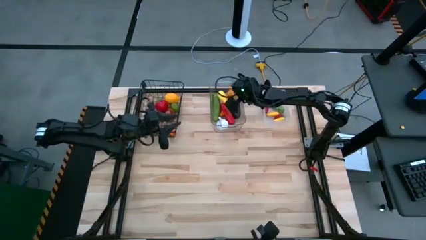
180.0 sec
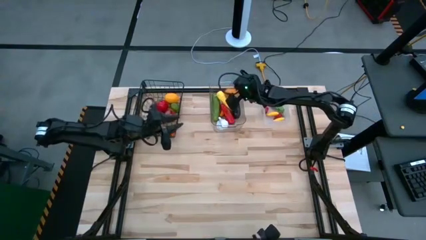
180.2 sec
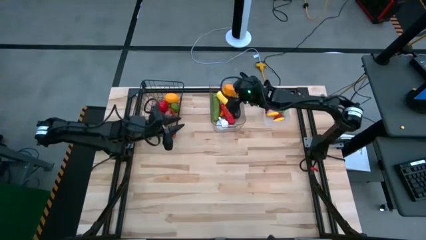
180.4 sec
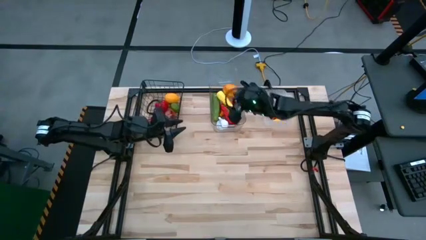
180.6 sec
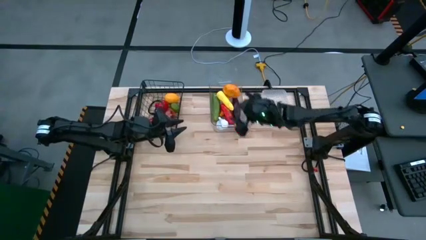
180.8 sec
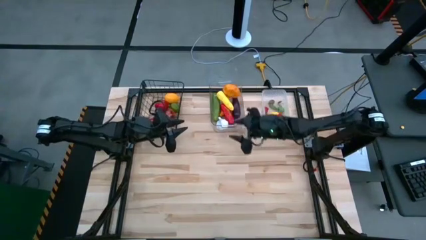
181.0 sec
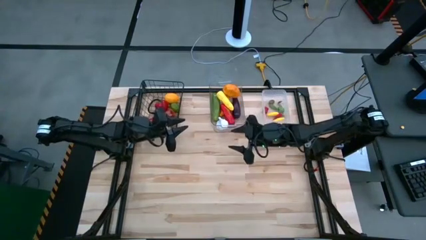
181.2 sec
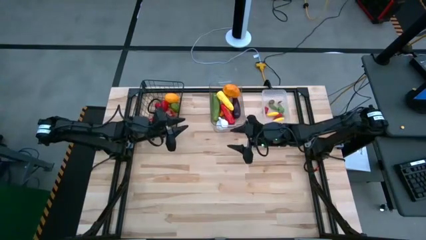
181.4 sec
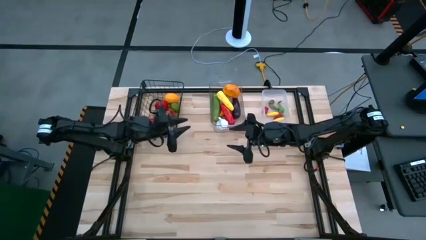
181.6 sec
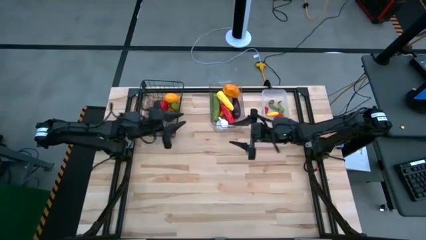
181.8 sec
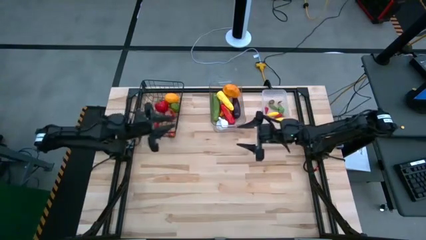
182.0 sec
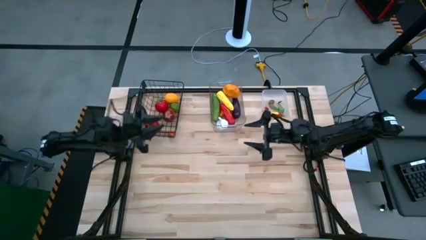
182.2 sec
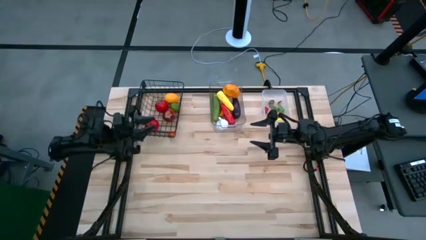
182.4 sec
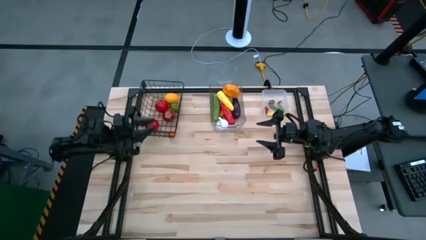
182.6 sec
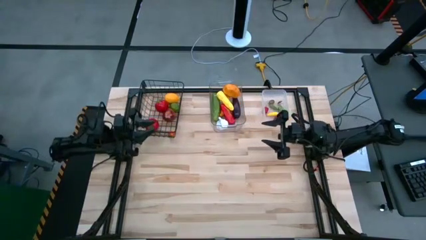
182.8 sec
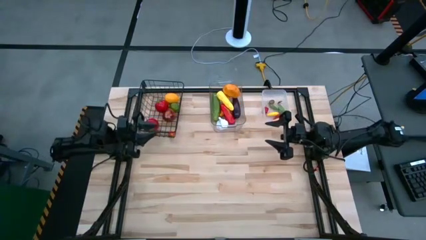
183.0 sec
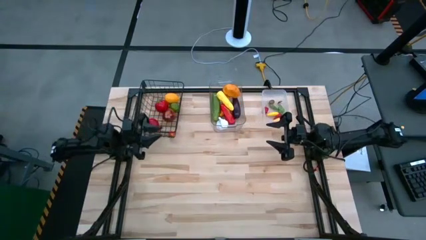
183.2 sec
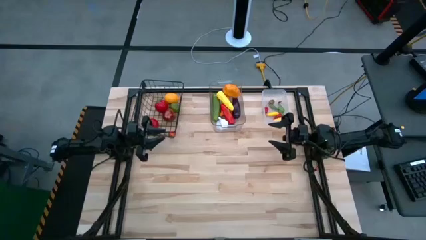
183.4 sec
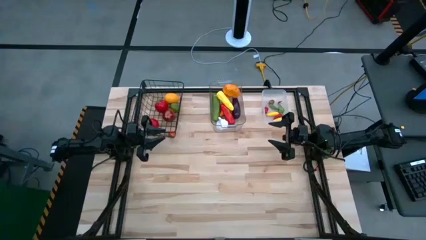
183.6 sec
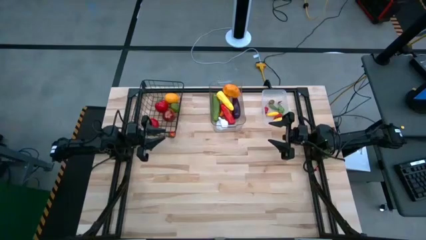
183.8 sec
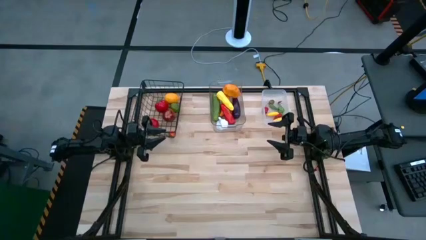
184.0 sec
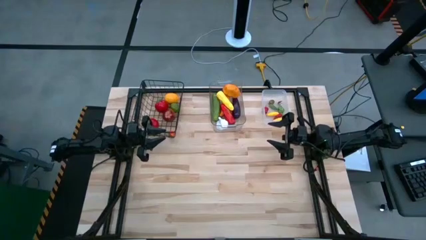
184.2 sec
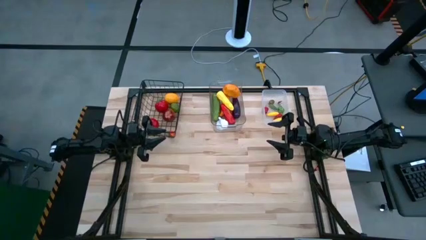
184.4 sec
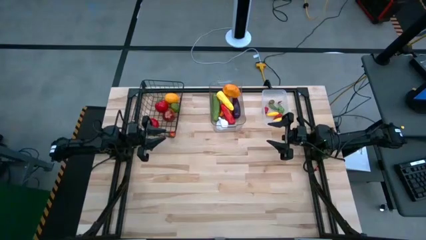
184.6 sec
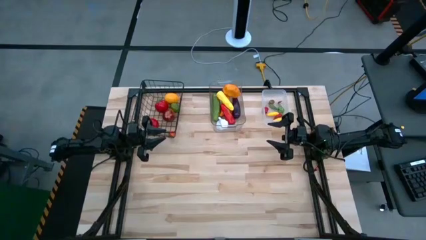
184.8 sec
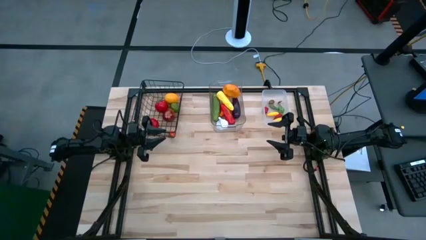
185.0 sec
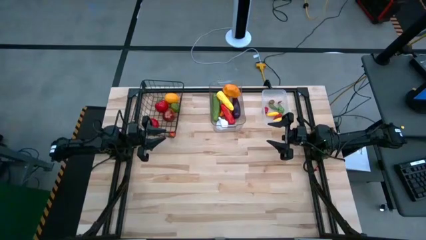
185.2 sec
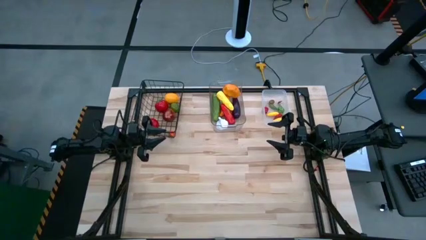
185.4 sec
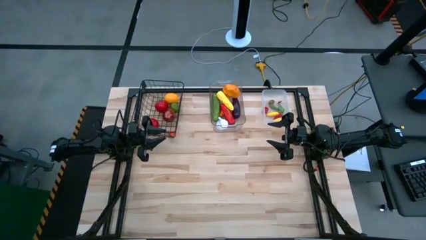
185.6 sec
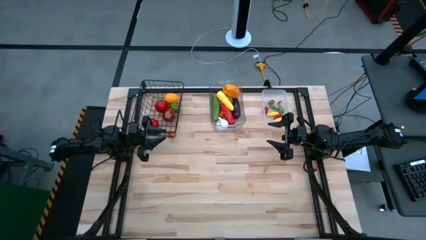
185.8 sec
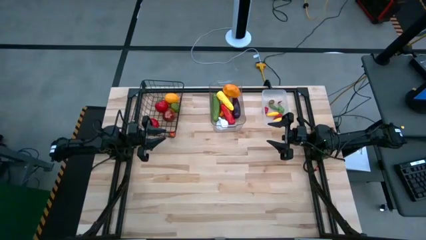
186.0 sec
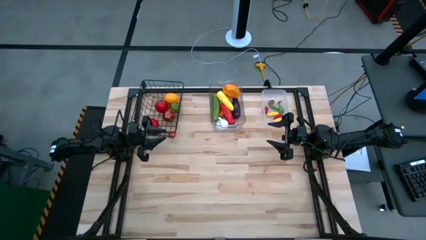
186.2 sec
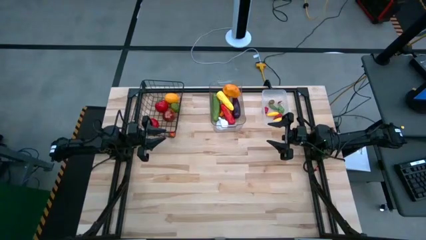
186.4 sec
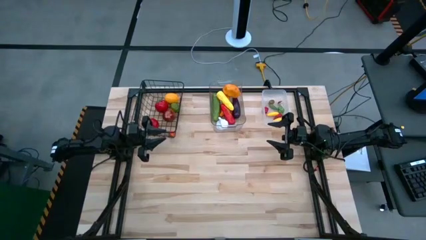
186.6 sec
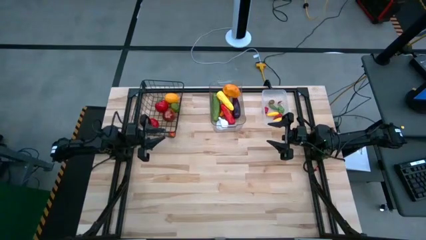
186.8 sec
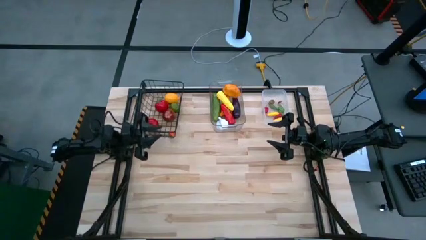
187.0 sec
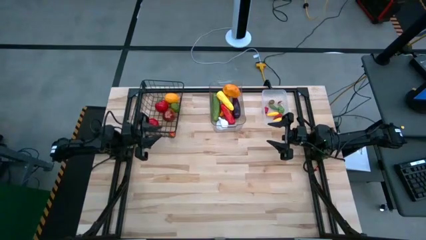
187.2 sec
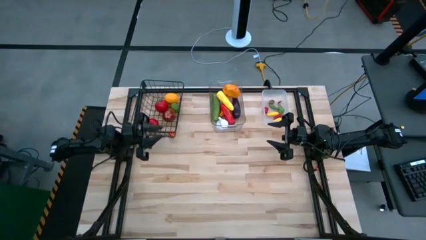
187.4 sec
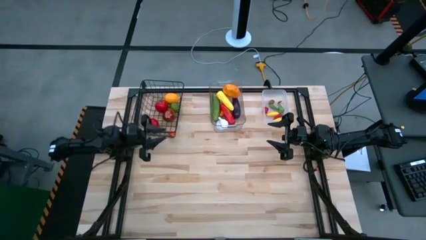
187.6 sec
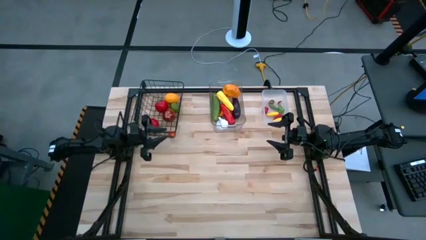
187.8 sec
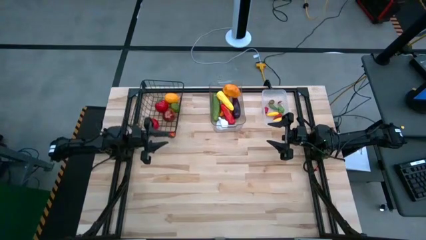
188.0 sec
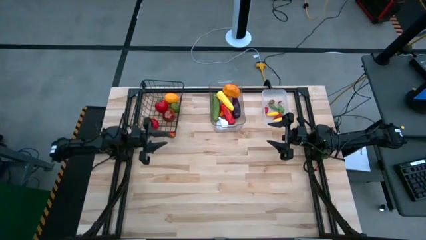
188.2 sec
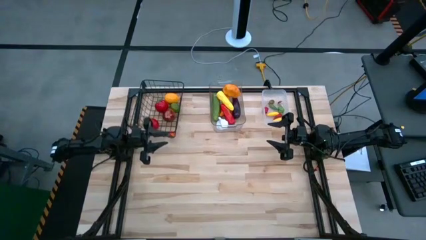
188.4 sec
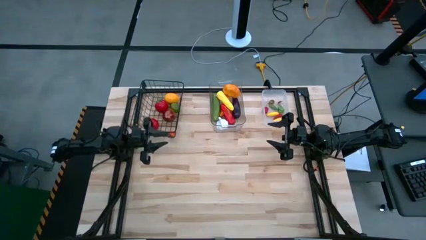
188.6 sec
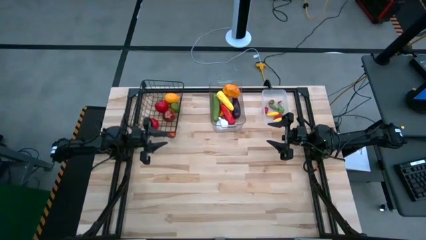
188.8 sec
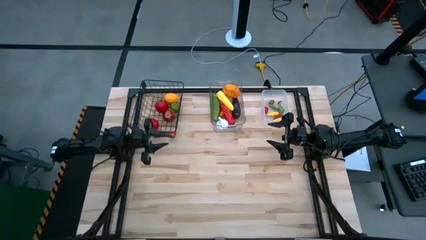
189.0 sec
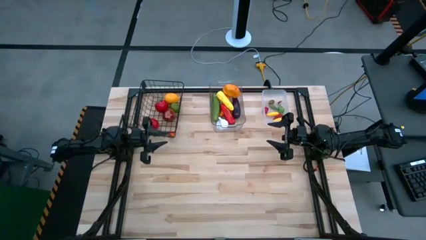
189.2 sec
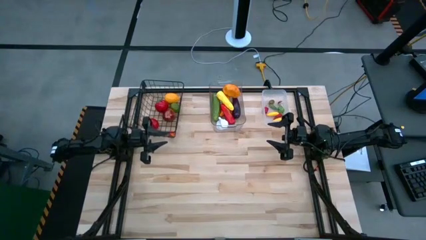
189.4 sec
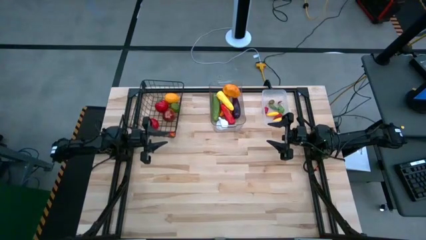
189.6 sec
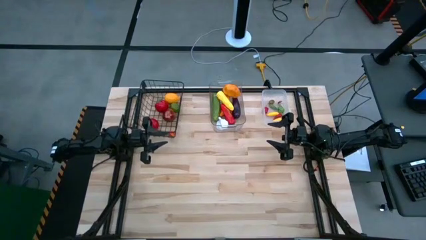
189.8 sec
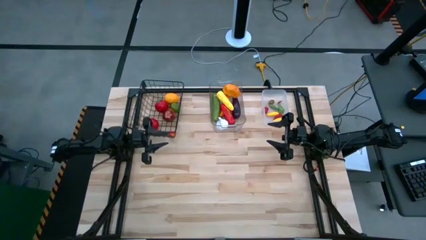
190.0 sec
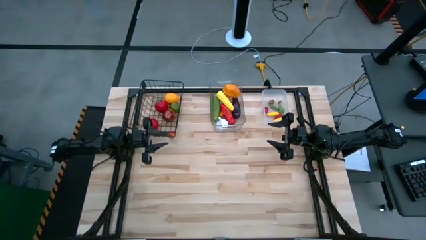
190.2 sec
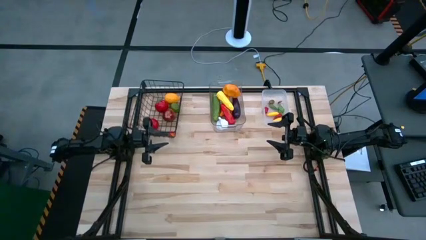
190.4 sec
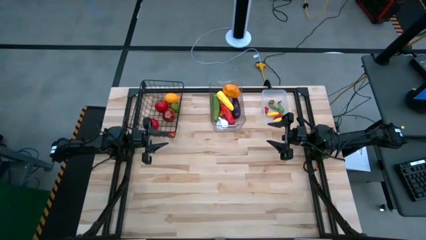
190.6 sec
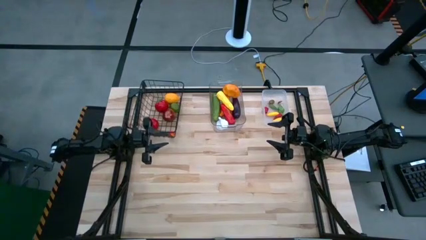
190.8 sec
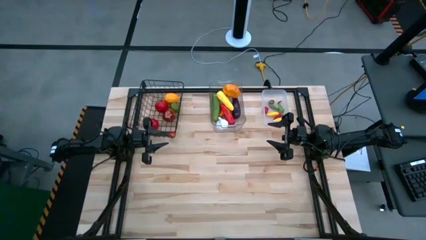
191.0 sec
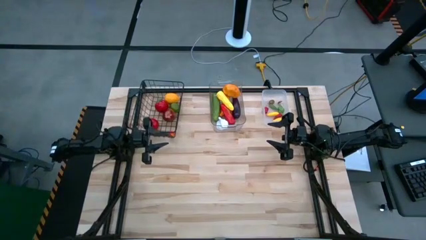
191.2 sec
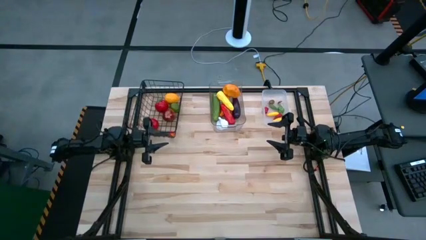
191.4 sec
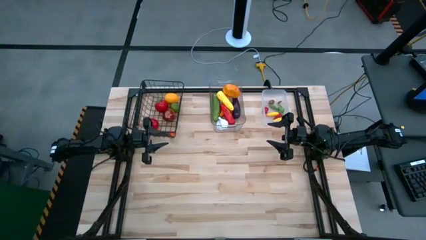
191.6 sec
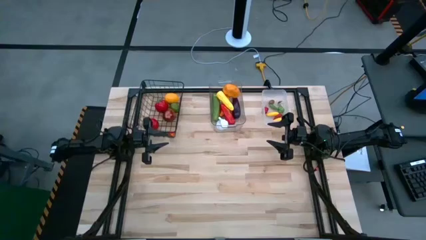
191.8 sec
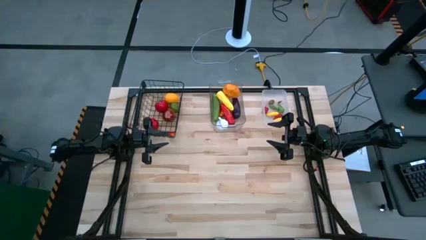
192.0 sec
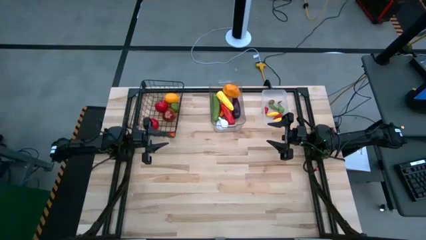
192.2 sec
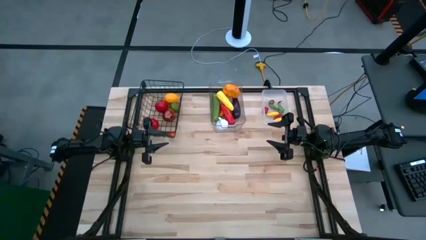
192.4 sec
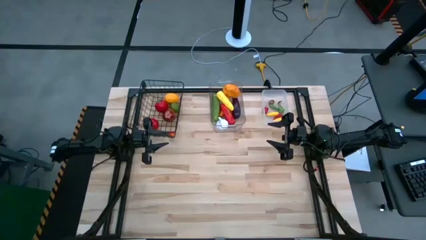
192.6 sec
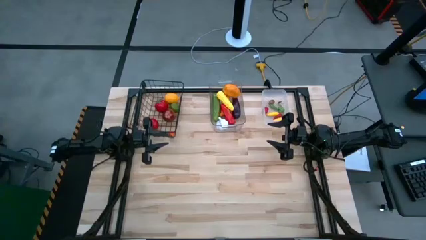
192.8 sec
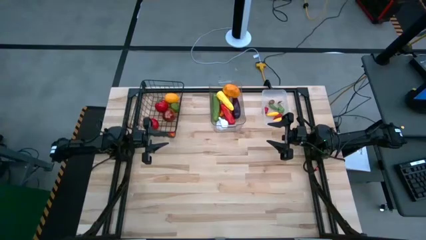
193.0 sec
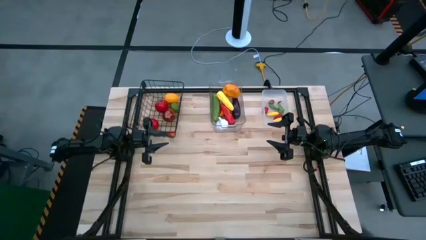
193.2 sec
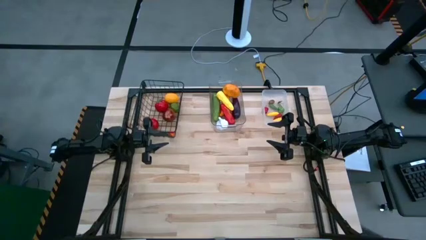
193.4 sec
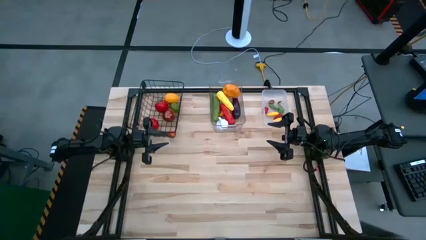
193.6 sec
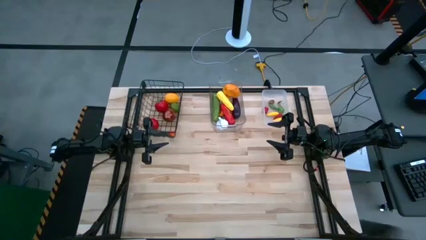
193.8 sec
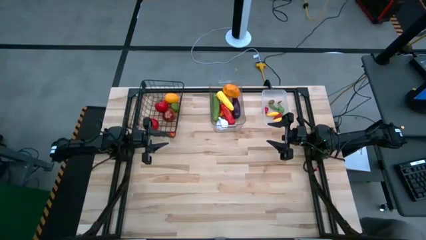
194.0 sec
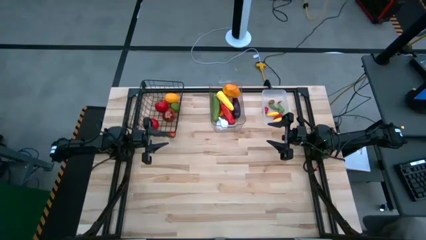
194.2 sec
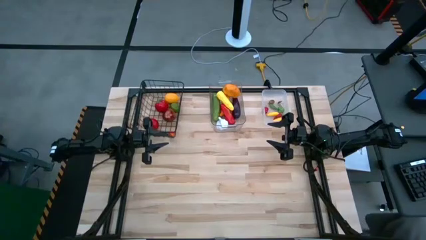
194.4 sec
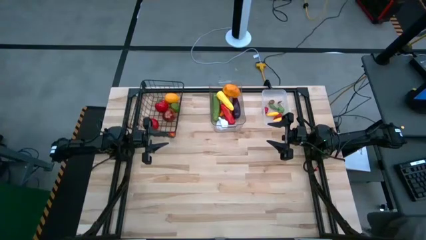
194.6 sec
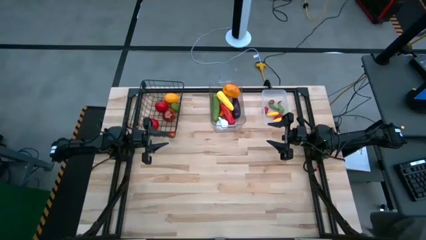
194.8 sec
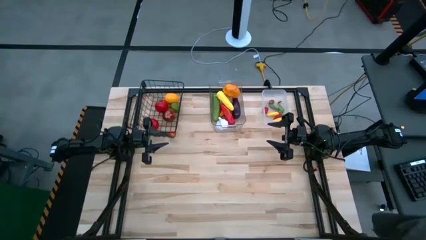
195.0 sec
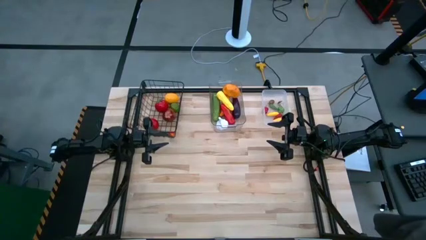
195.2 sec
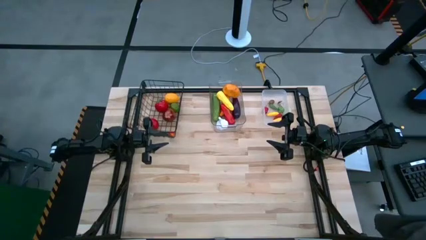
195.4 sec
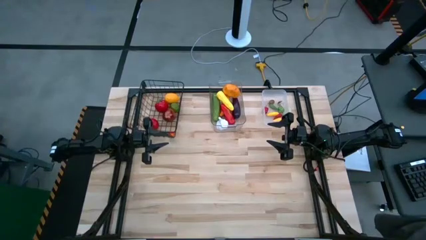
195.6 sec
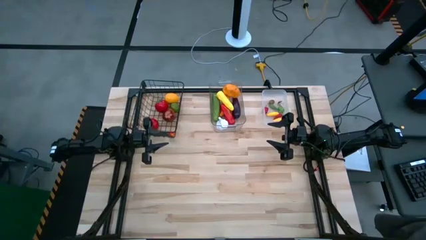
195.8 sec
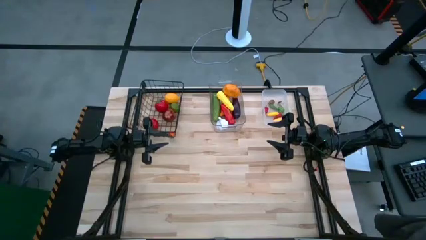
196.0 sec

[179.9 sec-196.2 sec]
Task: Sort produce into baskets
Return to Home Position
